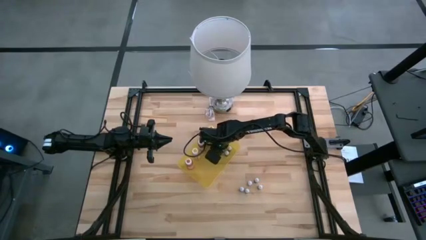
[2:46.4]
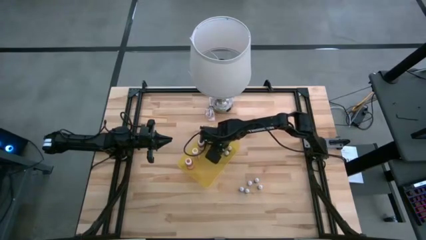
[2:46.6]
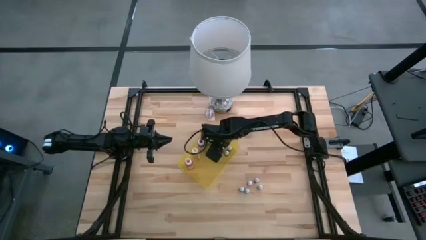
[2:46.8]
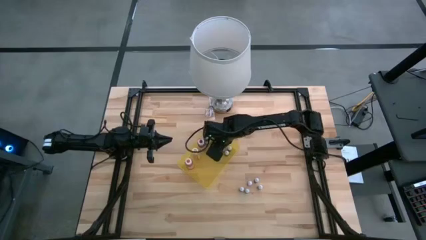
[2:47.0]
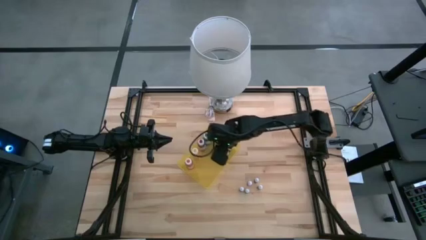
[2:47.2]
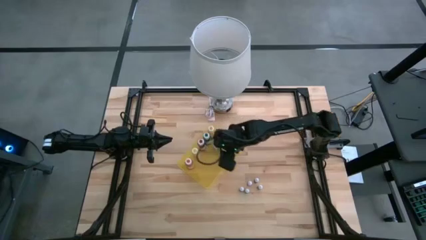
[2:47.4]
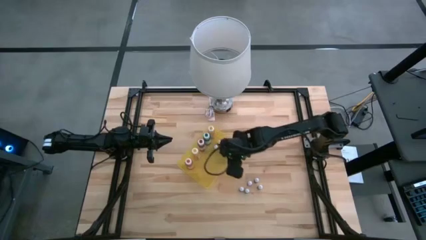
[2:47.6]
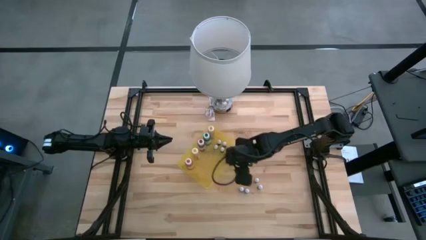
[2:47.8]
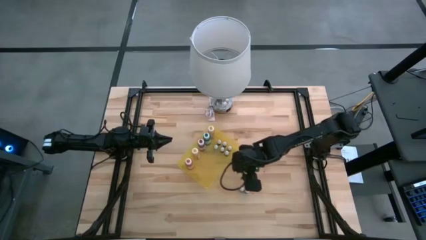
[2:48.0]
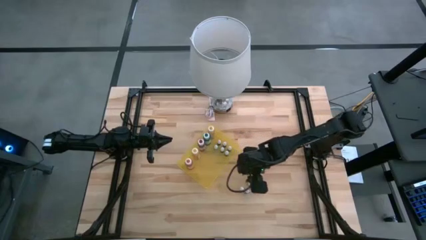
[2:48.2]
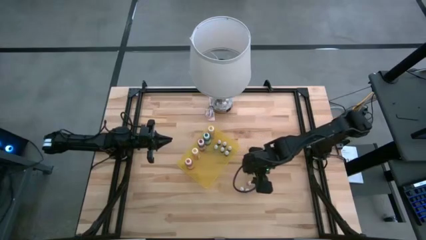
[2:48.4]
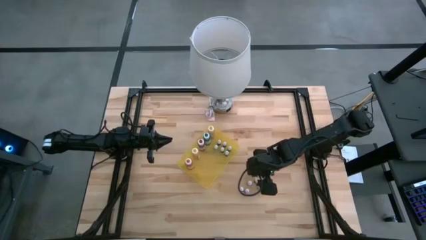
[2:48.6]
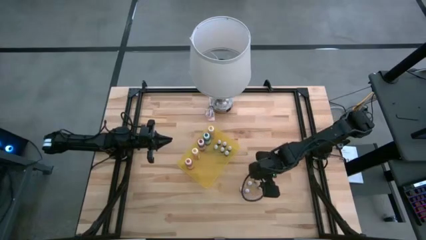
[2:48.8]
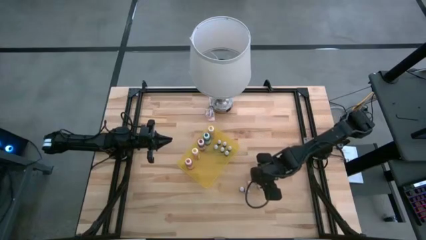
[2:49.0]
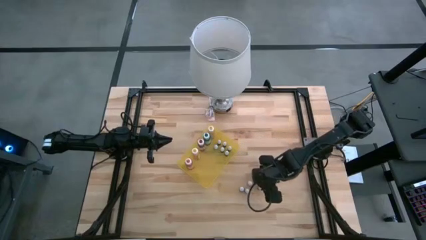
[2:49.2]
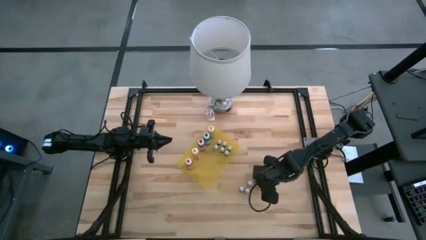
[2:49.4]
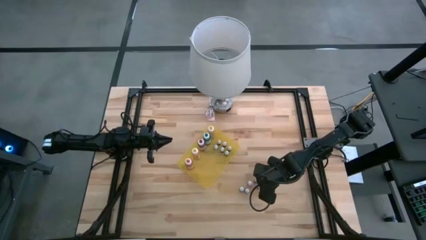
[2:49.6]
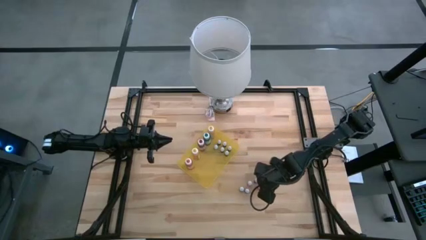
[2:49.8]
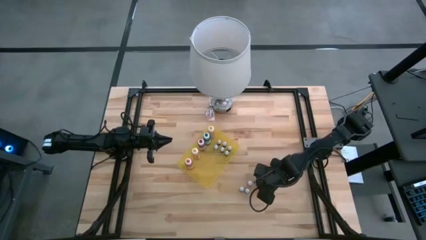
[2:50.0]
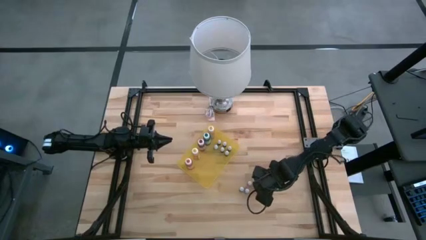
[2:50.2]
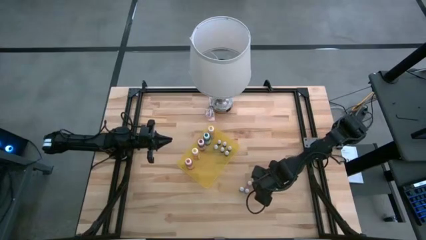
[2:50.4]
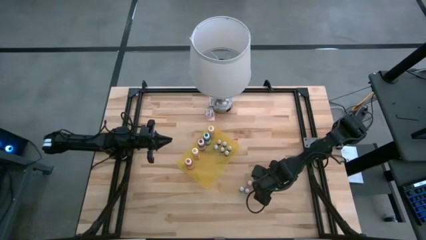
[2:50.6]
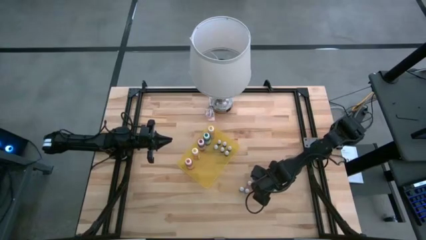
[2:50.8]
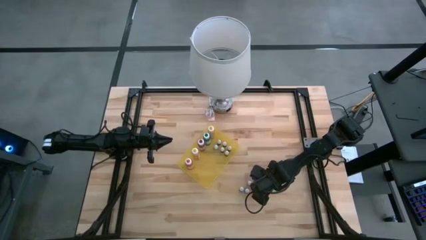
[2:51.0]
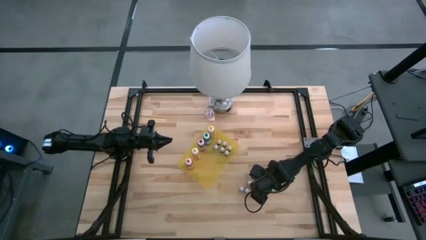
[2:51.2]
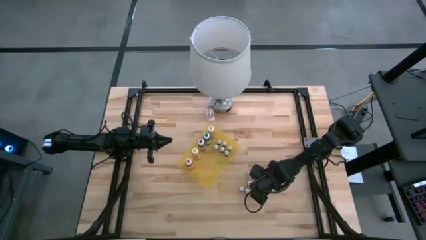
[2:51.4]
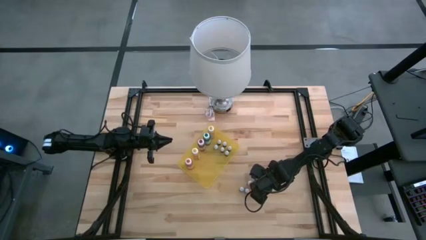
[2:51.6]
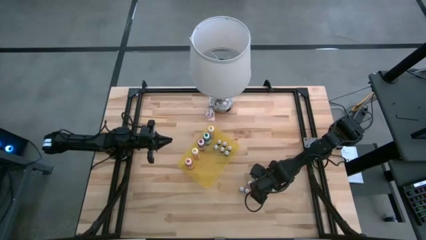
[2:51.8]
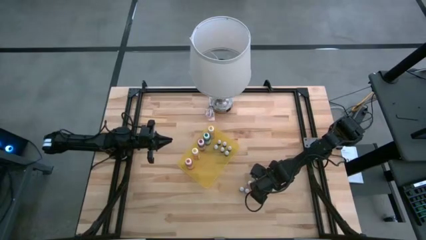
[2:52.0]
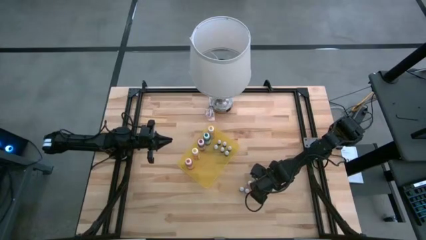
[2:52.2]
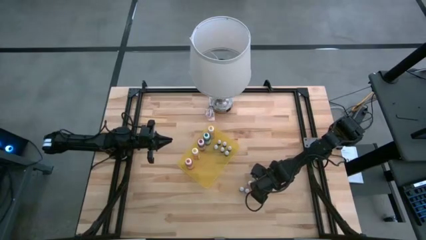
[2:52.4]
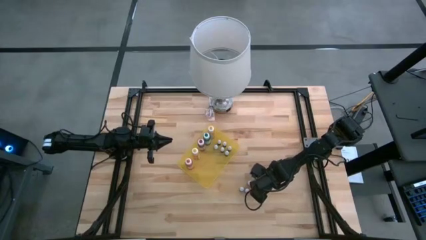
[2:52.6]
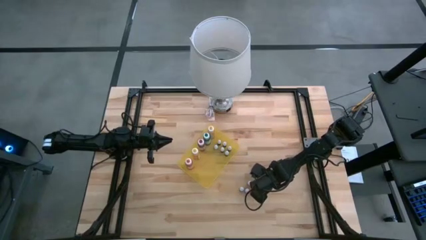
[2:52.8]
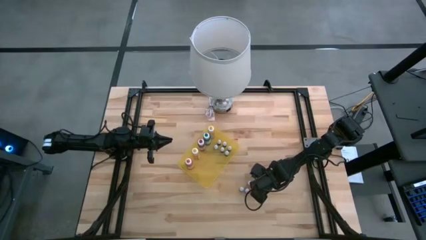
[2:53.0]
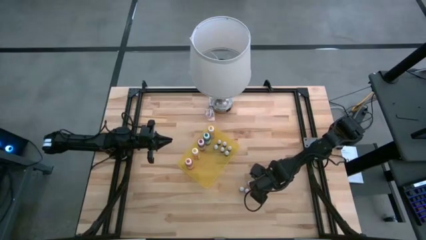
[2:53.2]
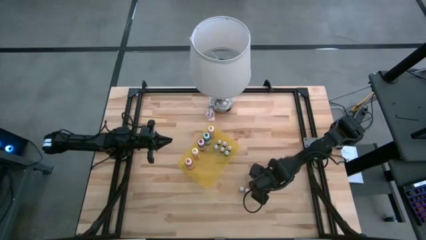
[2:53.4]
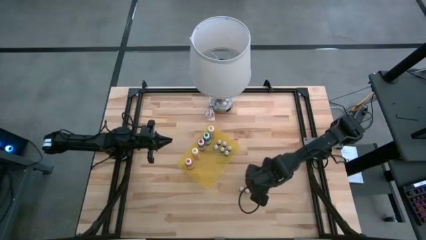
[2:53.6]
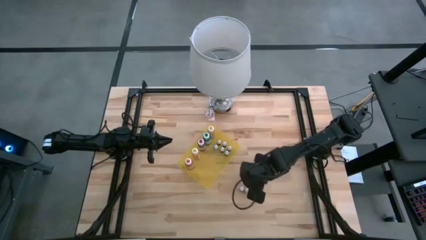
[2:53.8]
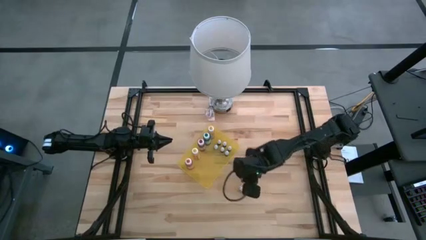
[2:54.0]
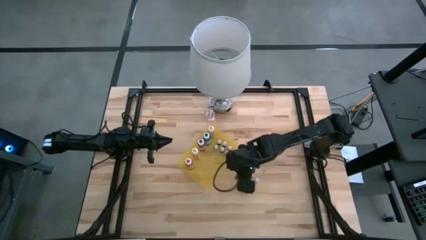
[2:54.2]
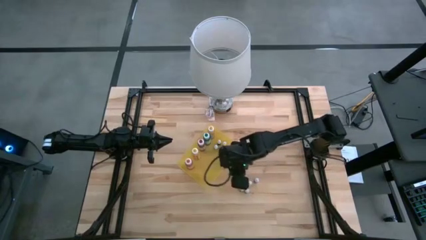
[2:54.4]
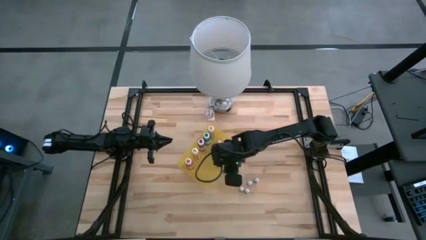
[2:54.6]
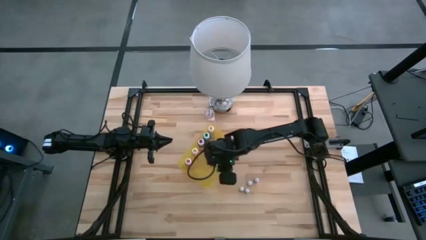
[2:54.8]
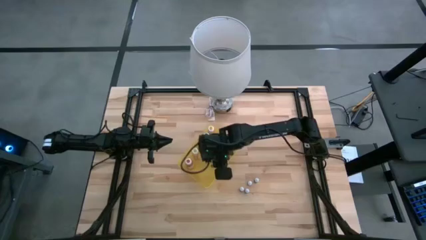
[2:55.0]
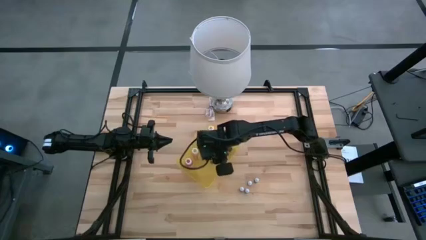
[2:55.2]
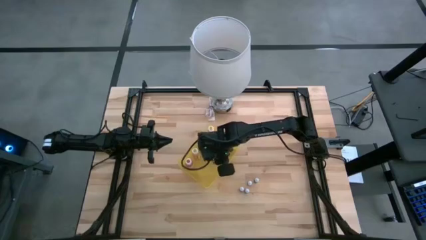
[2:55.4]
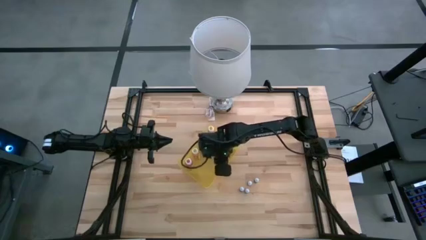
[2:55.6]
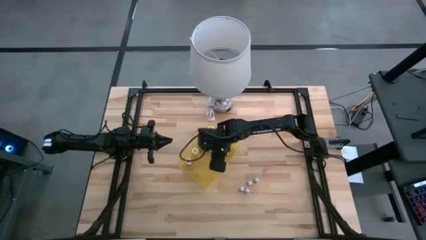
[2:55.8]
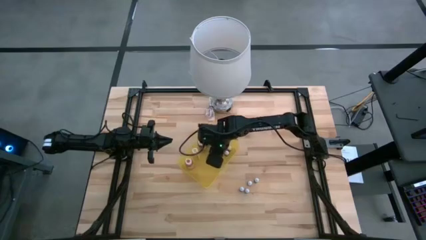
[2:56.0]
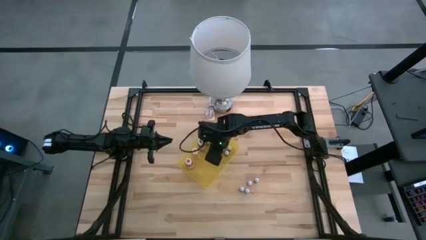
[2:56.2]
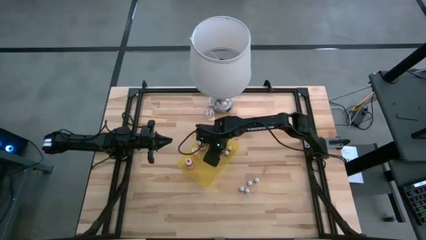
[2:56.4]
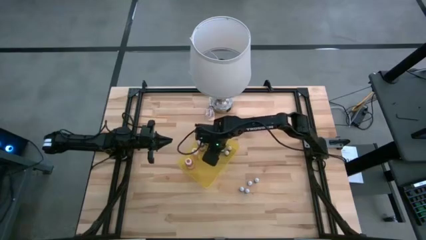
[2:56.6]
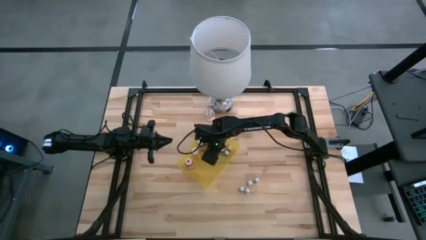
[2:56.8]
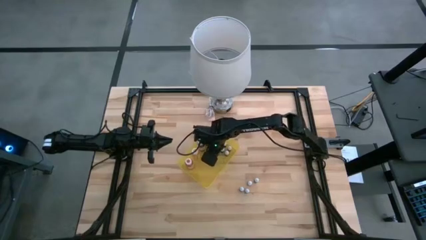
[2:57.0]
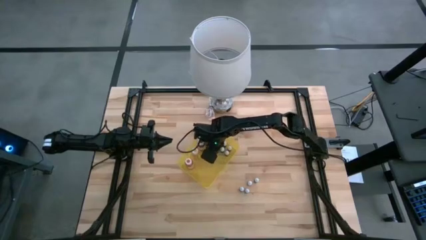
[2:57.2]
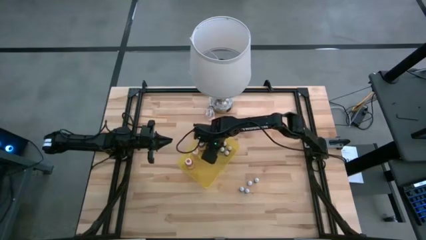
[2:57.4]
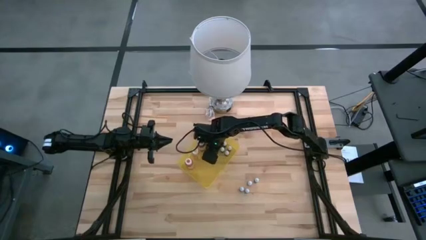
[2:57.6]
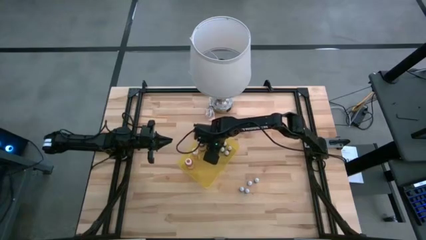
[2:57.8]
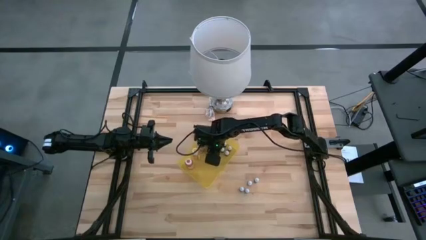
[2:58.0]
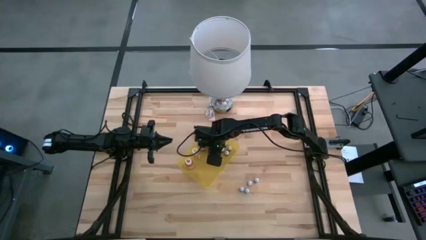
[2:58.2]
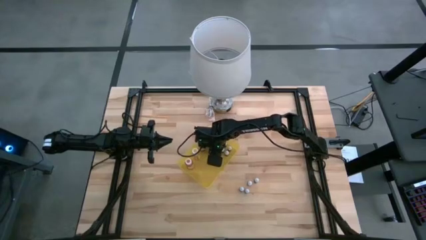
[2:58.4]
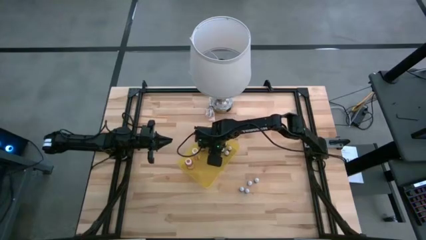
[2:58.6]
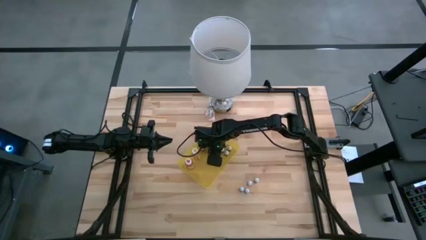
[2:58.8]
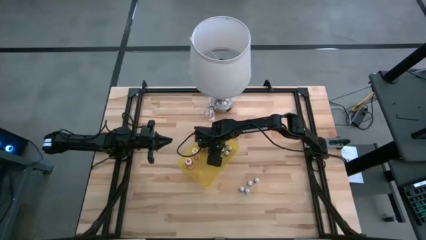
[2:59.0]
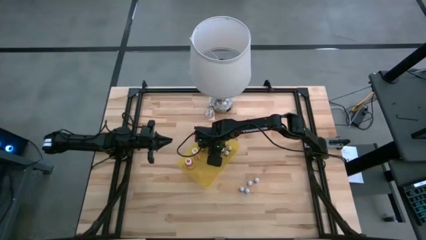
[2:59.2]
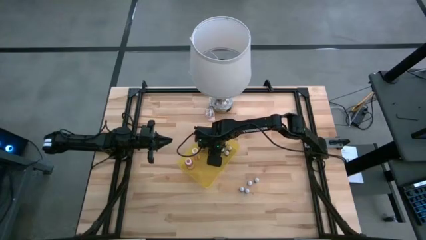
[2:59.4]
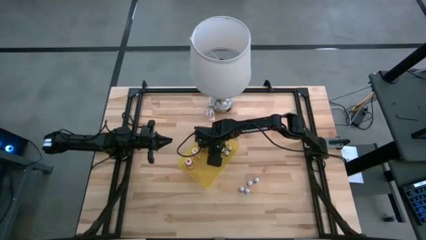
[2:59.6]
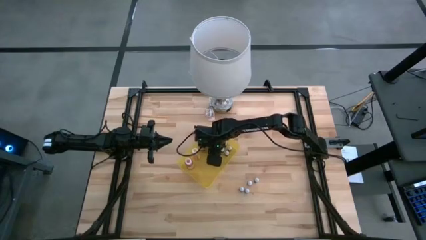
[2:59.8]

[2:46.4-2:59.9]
Task: Pick & Place food coloring
Put the small orange food coloring bottle into the yellow bin

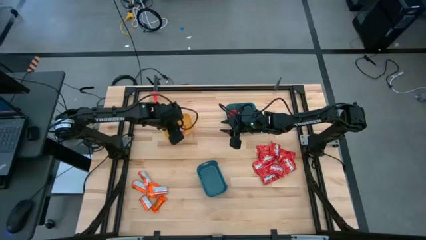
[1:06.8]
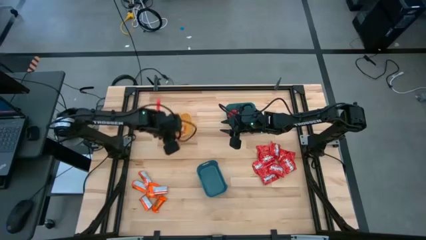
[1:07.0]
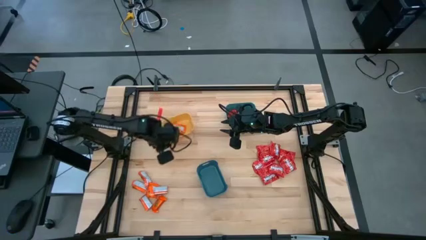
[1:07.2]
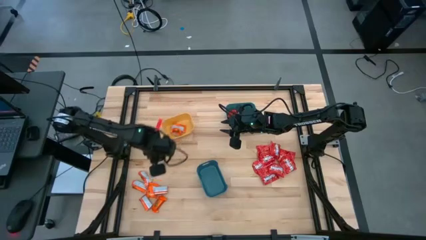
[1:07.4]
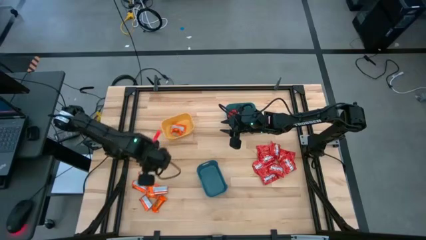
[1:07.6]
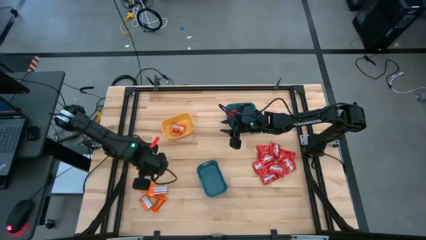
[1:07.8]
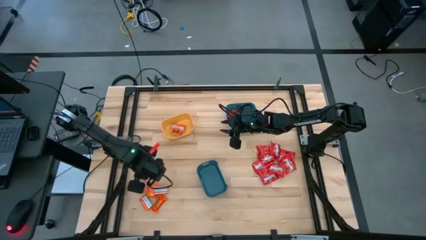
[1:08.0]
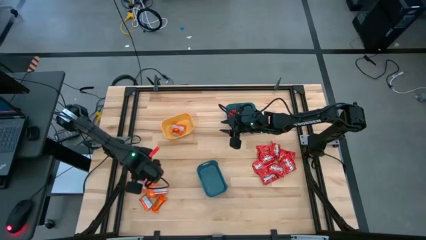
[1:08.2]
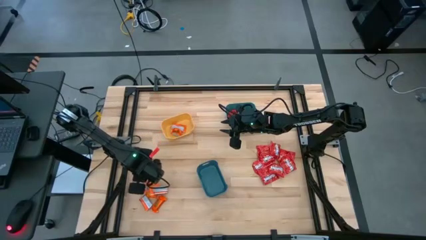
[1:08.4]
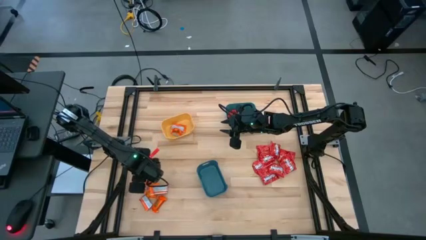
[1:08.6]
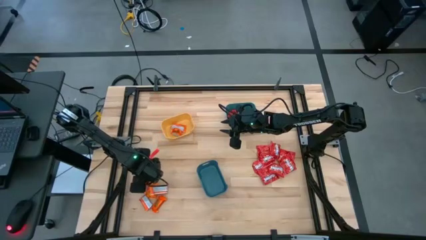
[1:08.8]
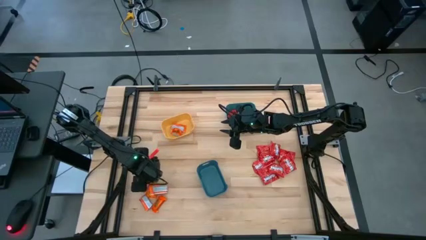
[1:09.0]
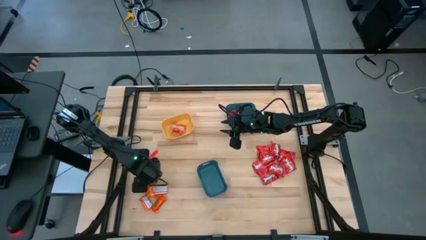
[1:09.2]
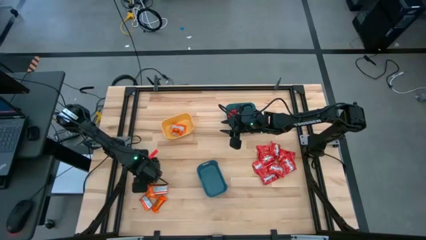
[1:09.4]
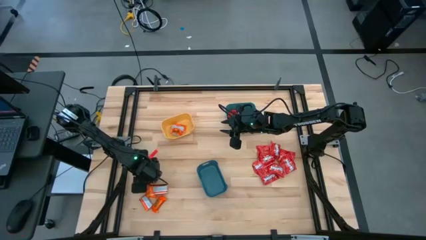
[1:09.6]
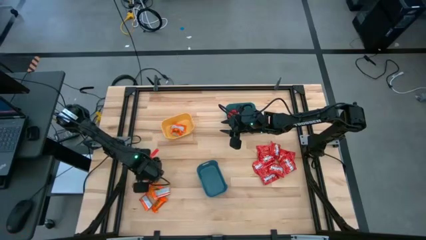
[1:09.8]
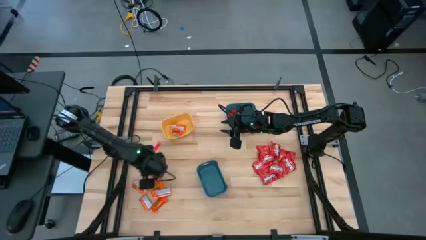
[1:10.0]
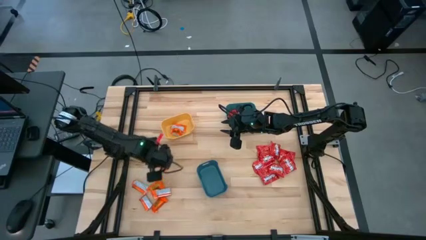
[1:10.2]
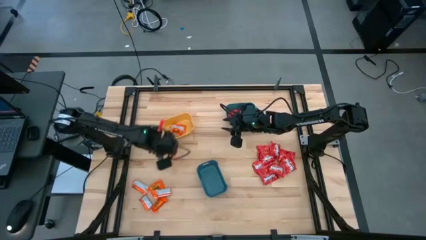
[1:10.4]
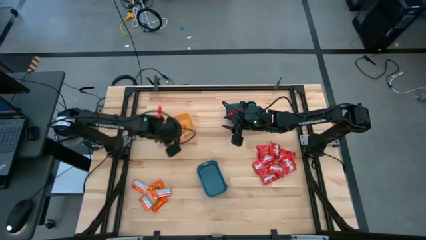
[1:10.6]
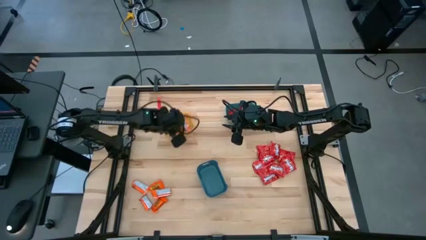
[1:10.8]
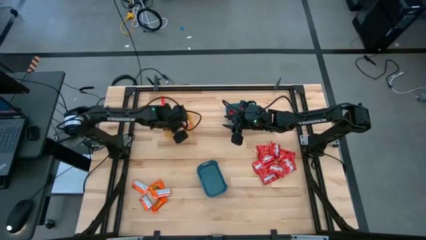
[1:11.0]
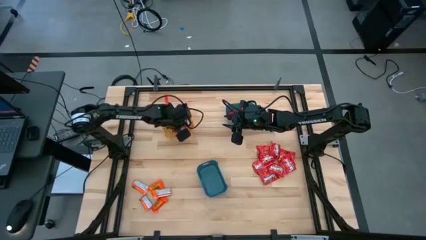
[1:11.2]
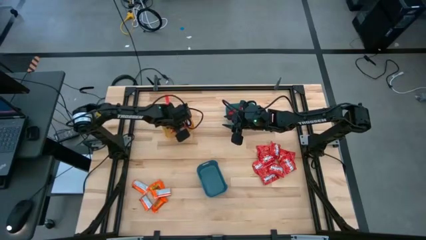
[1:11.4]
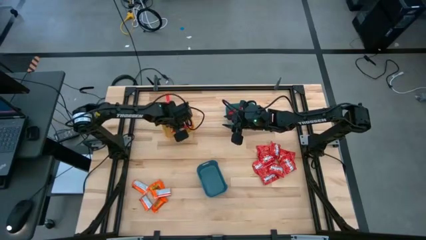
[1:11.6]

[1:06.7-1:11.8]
Task: Sort candy
Put the orange chocolate bar into the yellow bin
